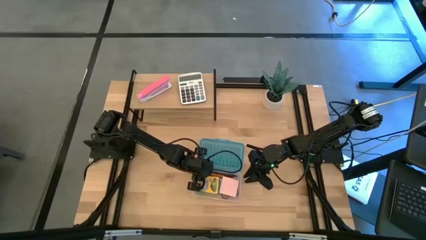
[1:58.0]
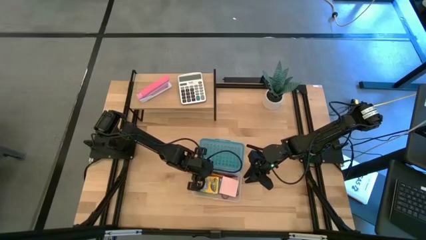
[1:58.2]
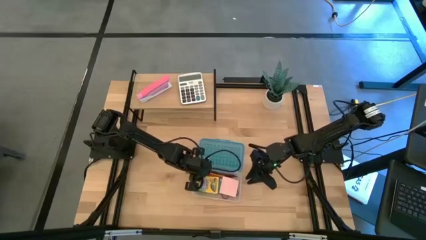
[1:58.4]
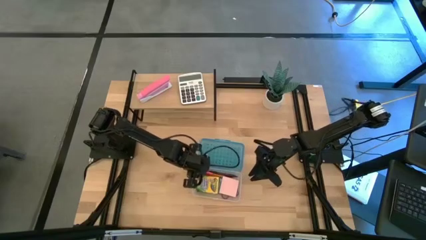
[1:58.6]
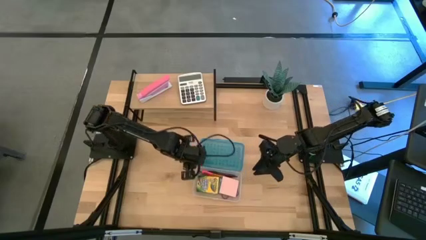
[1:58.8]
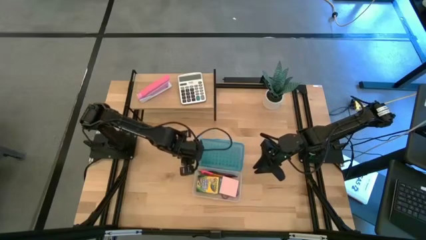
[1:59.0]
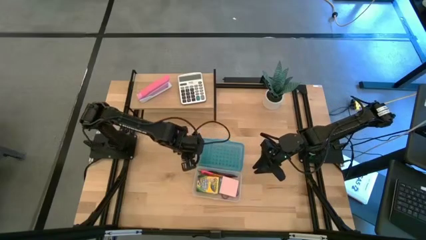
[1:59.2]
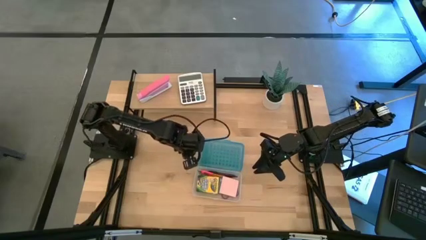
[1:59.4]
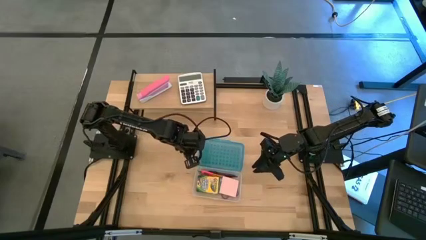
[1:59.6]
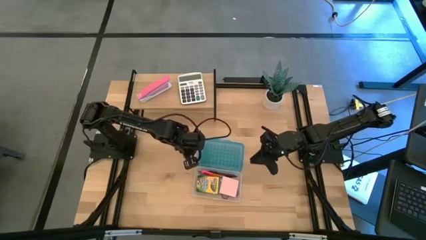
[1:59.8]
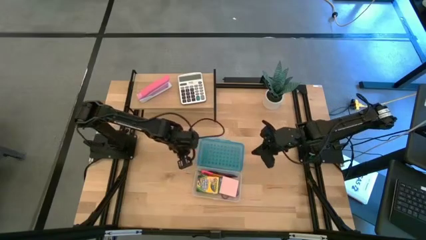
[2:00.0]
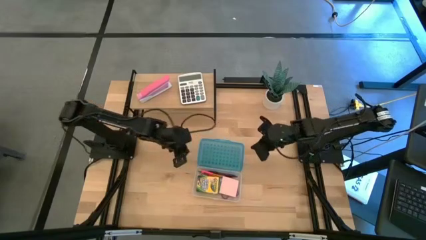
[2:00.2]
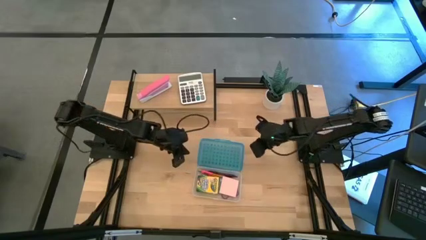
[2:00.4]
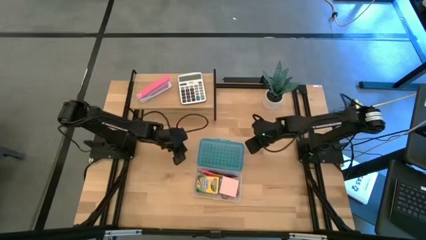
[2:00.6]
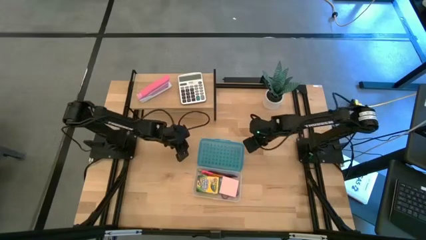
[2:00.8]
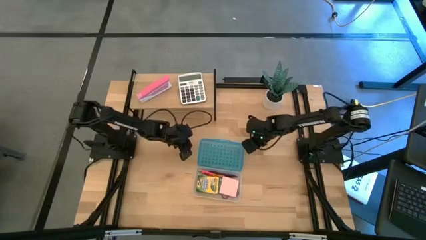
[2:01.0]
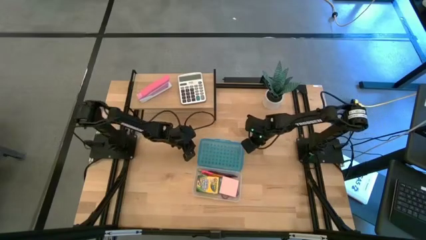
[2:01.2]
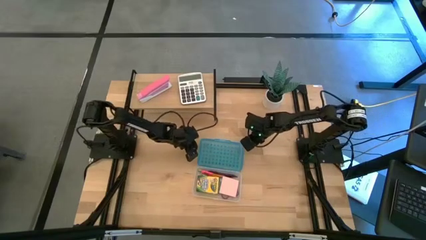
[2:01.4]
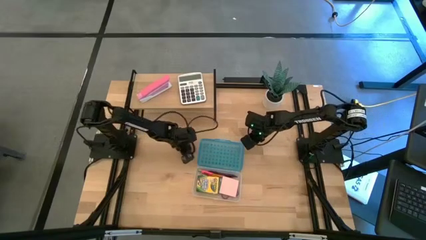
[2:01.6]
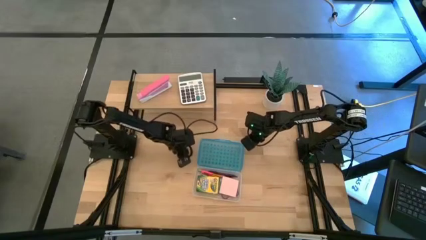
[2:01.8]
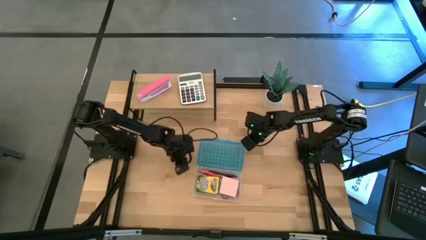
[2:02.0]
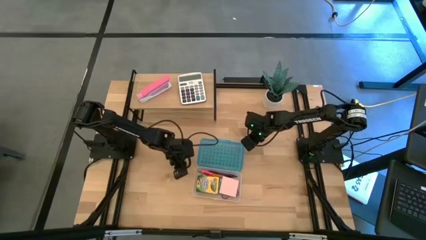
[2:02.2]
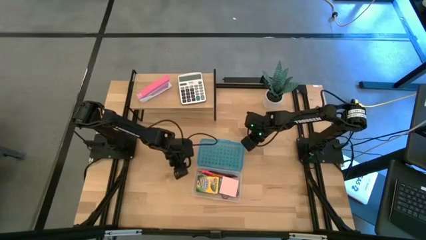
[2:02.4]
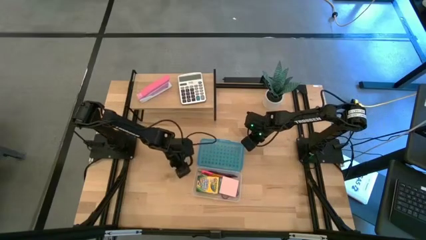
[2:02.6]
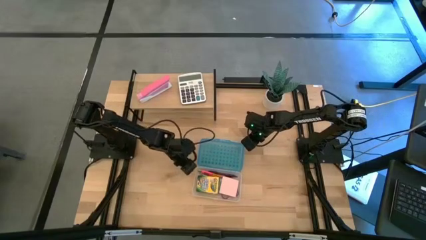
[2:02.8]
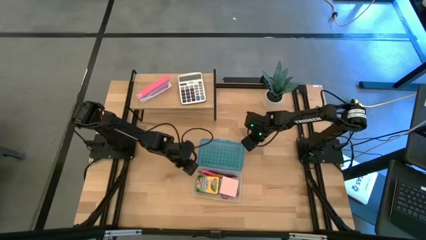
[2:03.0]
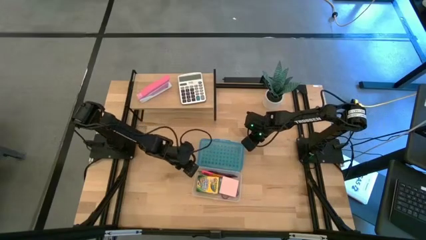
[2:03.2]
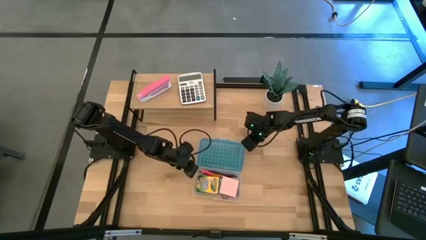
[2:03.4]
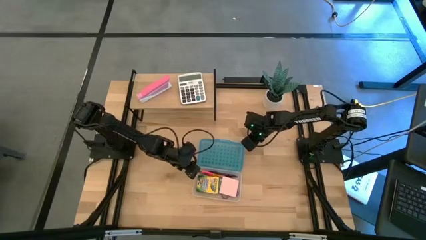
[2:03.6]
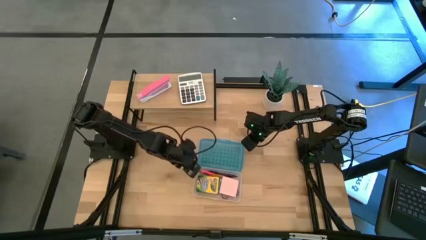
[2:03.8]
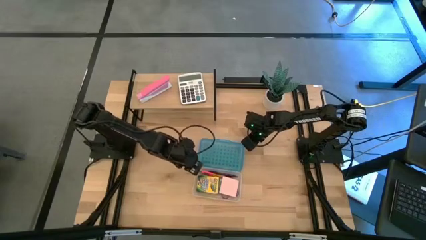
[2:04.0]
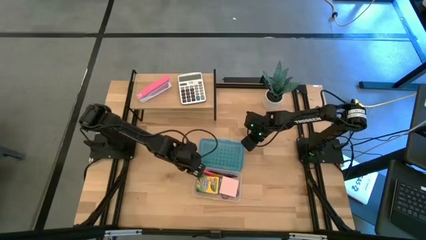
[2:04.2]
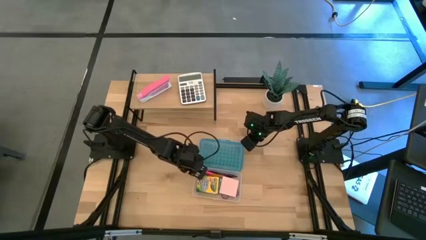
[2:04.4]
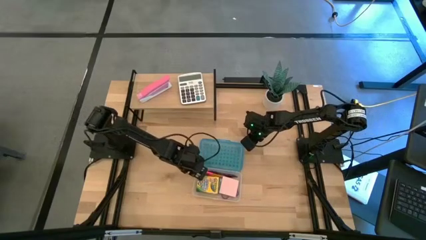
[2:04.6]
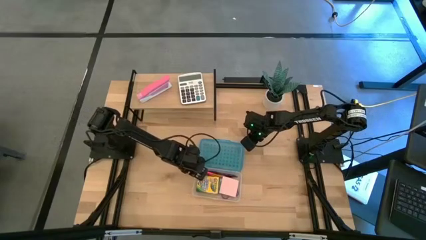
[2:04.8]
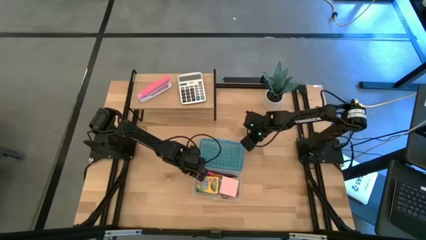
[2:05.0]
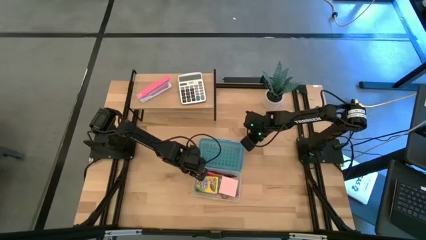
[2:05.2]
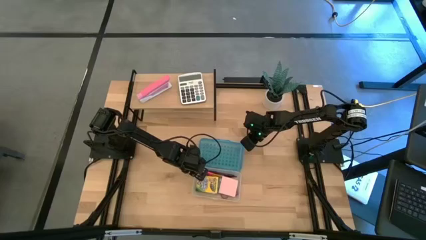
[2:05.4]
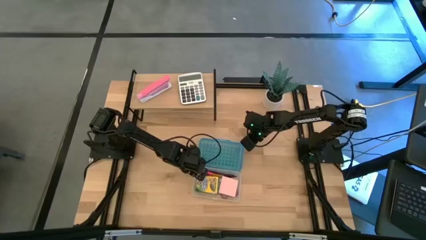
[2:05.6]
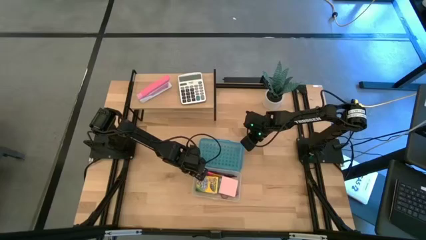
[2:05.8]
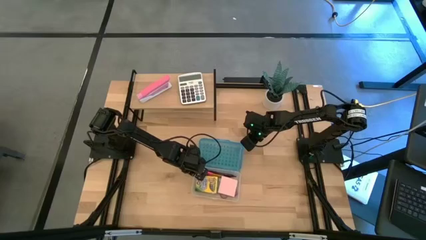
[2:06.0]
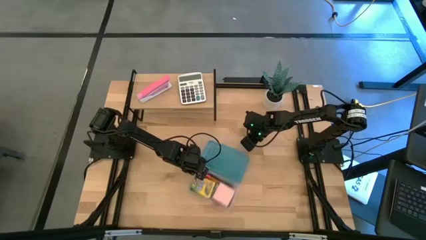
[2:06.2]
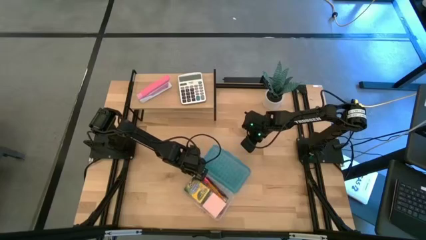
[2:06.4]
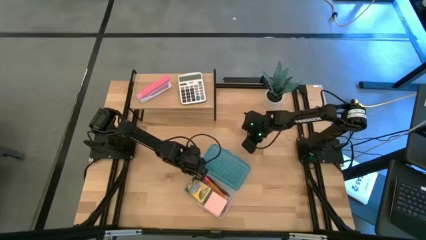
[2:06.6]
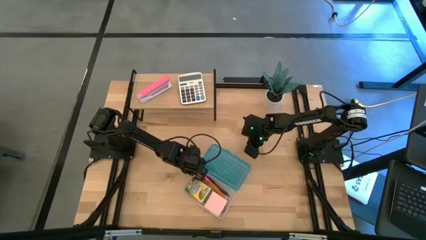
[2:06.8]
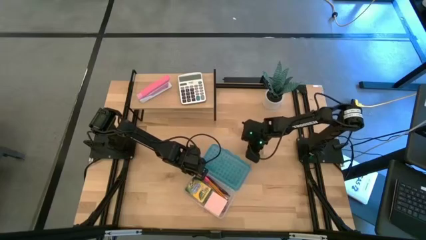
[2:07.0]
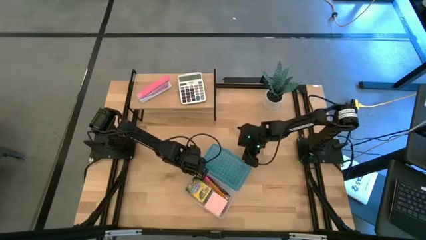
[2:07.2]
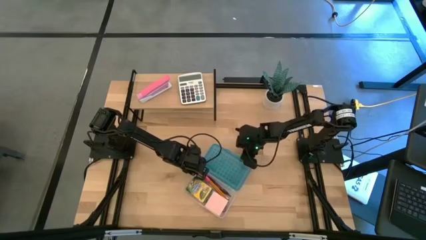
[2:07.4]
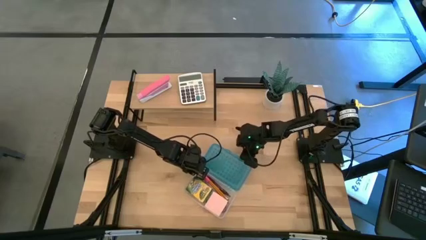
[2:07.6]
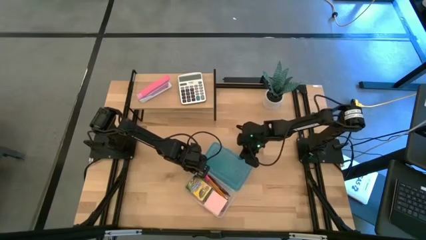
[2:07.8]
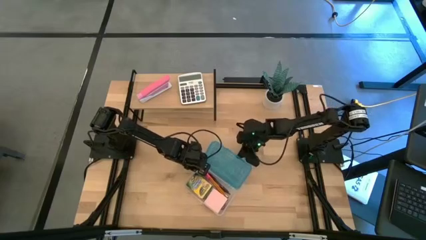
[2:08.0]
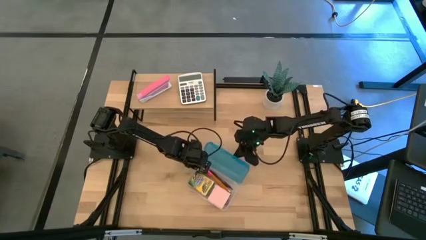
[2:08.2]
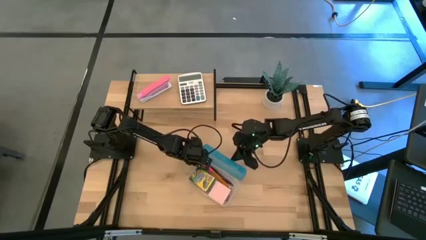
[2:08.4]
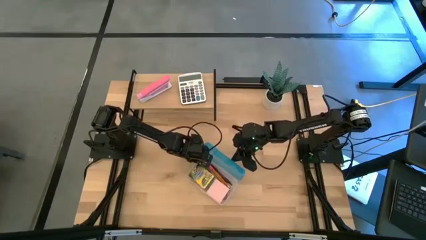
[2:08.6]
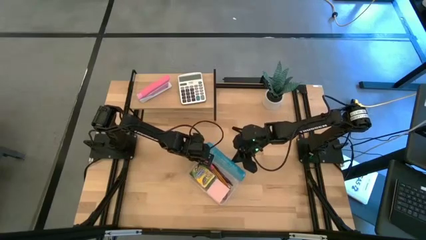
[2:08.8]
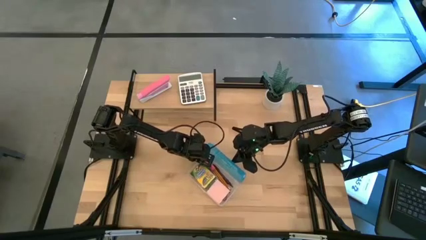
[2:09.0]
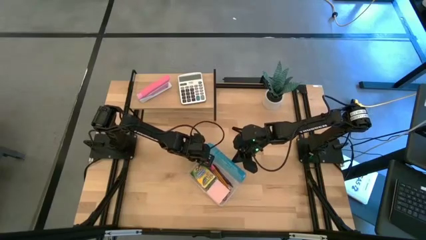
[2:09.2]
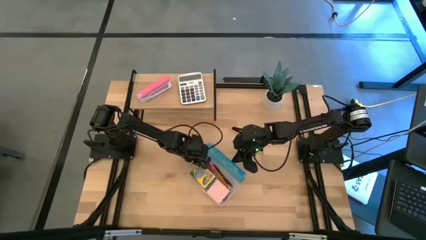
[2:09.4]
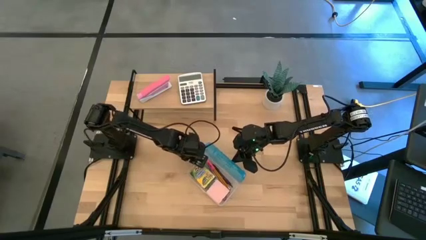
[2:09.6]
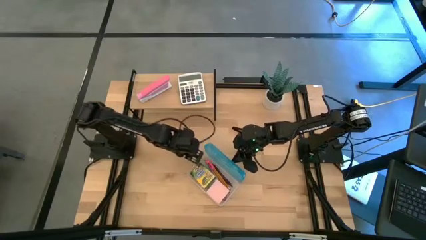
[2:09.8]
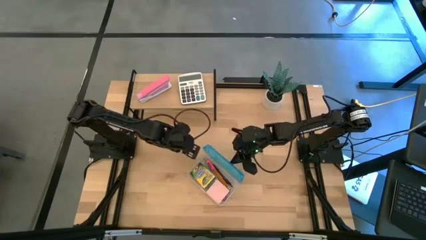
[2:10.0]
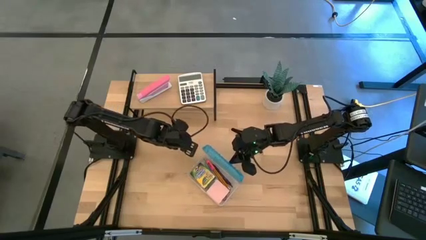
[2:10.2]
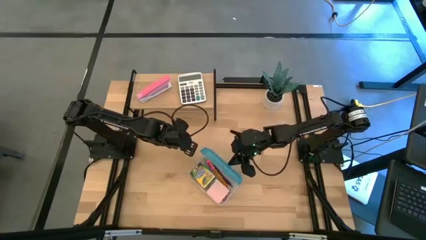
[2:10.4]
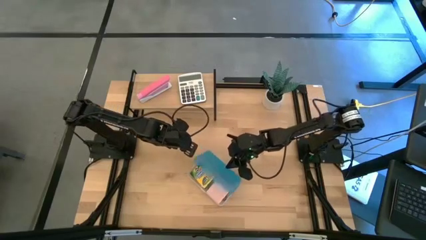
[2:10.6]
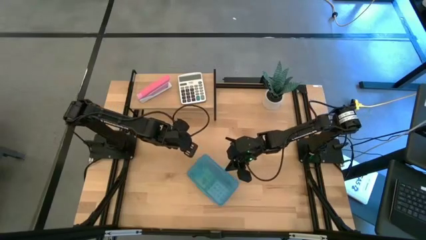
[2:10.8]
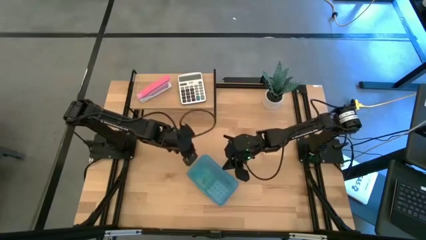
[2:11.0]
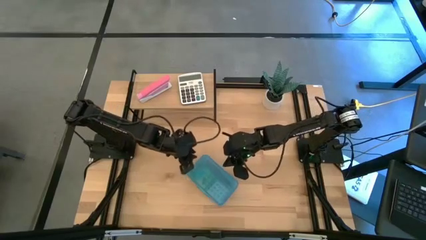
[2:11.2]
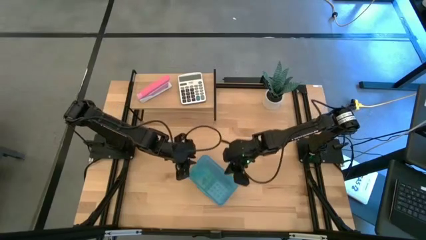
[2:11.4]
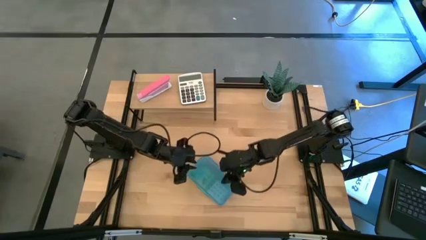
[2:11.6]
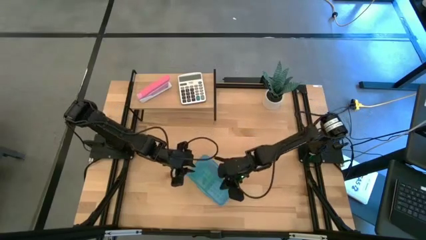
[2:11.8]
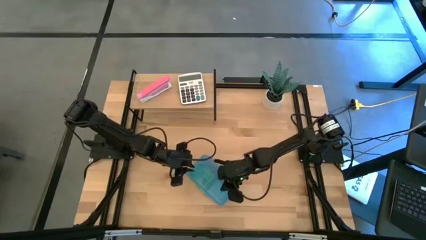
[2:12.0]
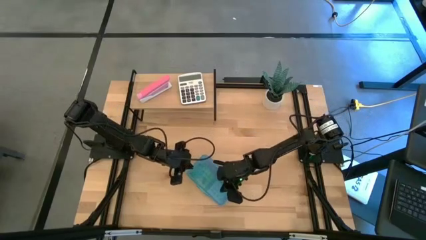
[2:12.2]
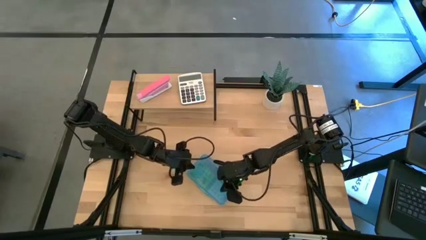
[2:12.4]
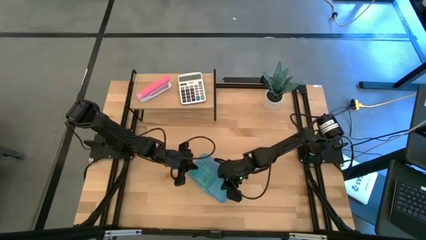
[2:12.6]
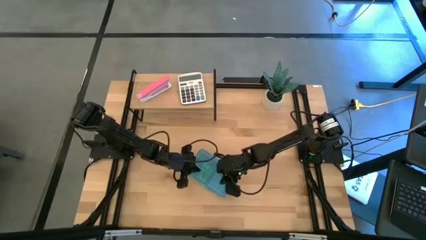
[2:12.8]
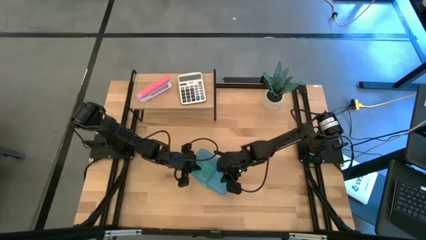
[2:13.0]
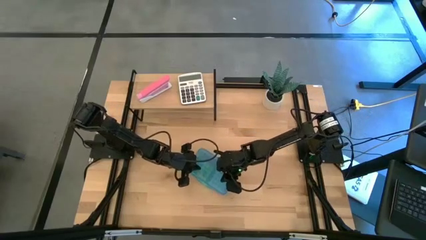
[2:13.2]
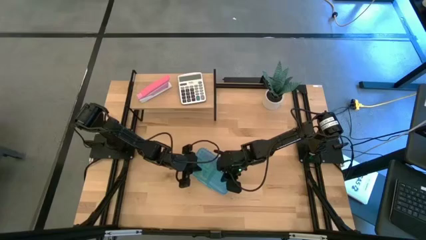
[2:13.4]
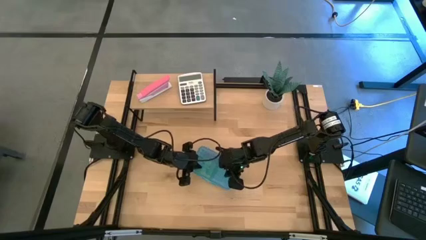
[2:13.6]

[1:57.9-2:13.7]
Task: Pack school essentials
Close the blue supply box
